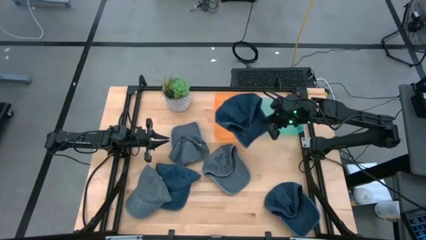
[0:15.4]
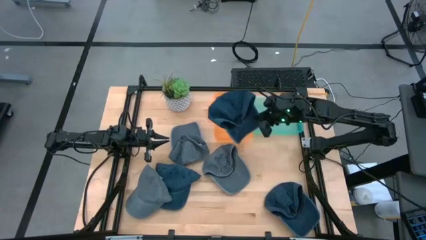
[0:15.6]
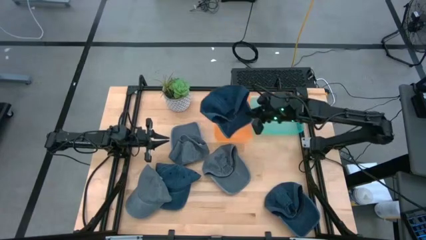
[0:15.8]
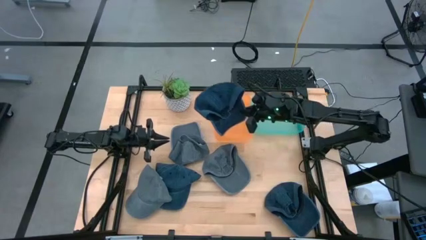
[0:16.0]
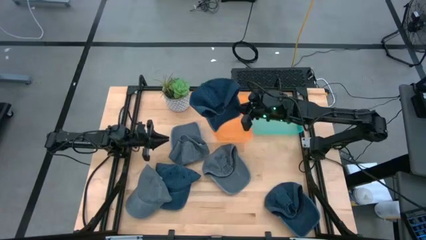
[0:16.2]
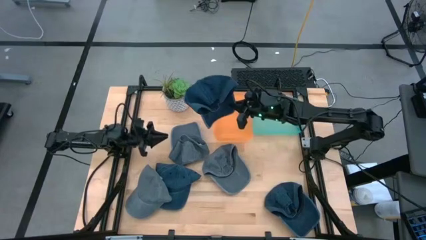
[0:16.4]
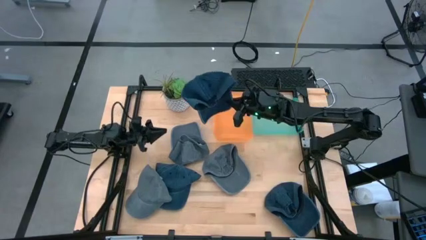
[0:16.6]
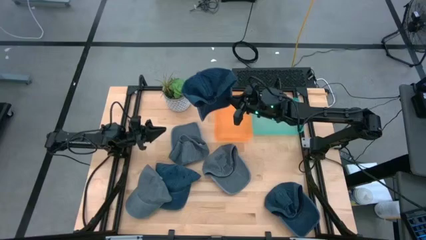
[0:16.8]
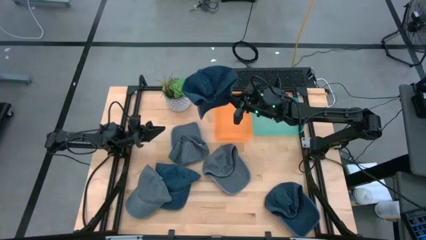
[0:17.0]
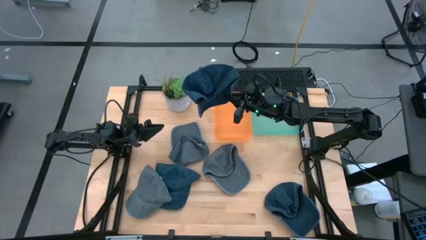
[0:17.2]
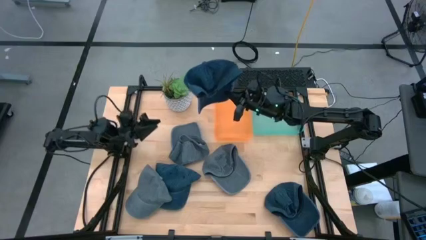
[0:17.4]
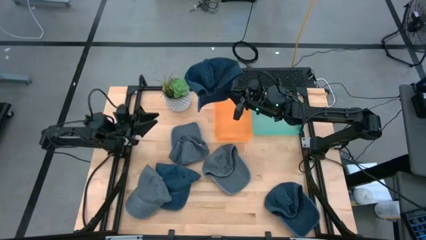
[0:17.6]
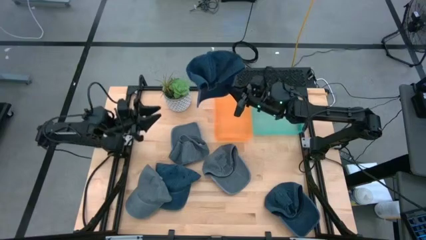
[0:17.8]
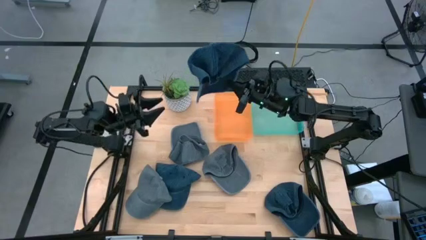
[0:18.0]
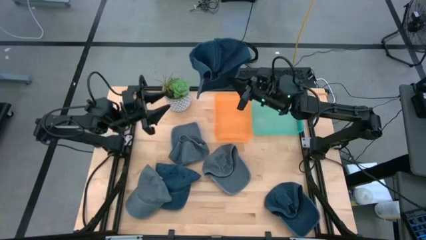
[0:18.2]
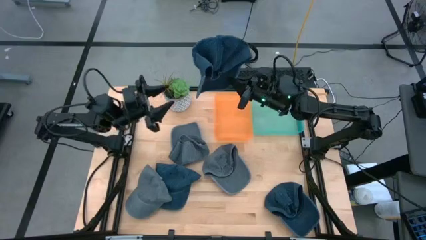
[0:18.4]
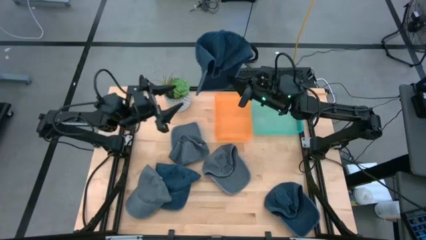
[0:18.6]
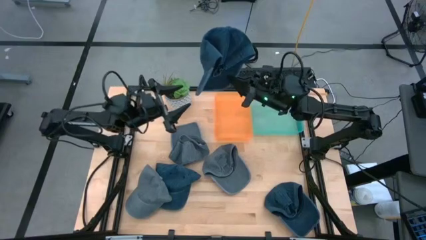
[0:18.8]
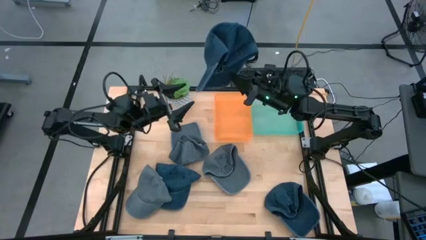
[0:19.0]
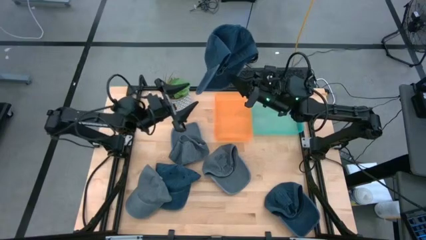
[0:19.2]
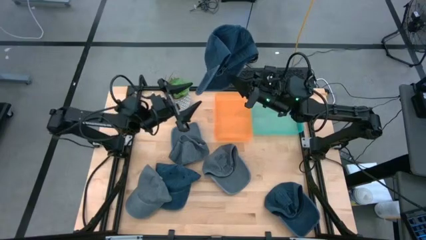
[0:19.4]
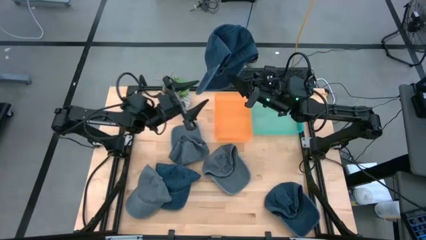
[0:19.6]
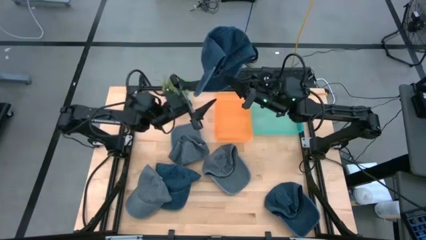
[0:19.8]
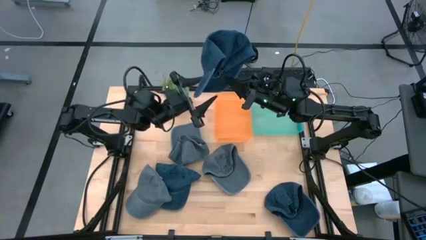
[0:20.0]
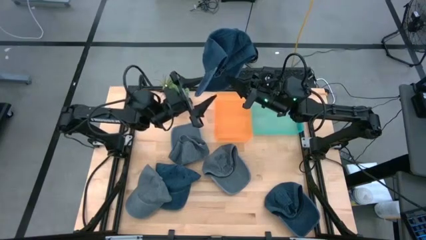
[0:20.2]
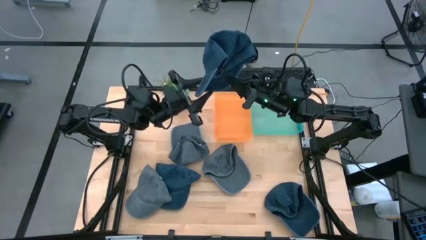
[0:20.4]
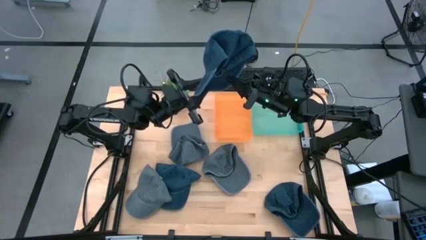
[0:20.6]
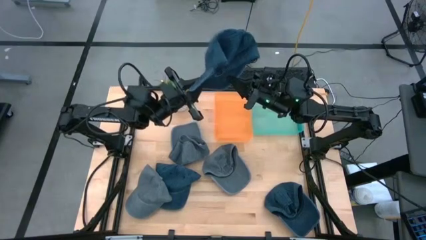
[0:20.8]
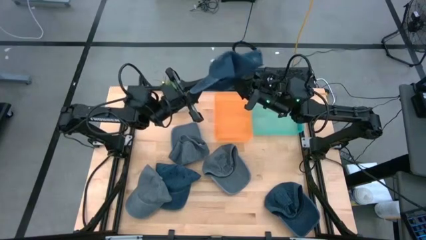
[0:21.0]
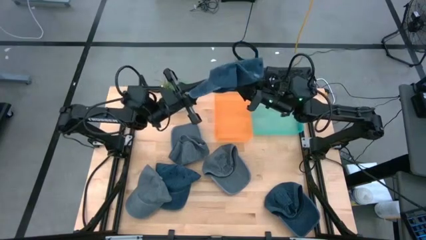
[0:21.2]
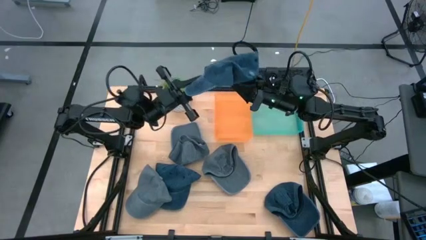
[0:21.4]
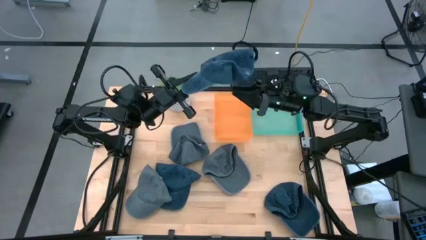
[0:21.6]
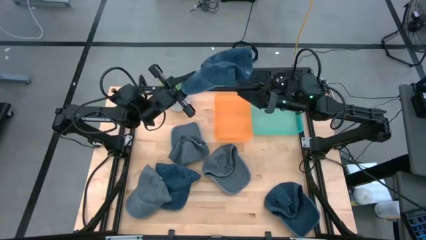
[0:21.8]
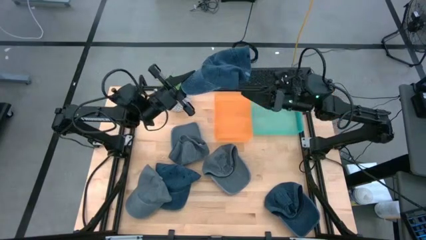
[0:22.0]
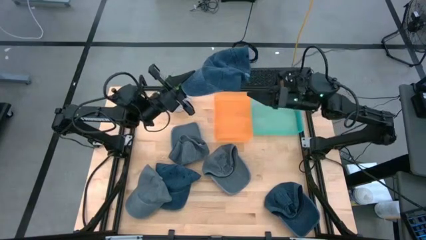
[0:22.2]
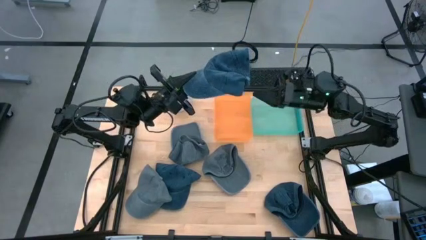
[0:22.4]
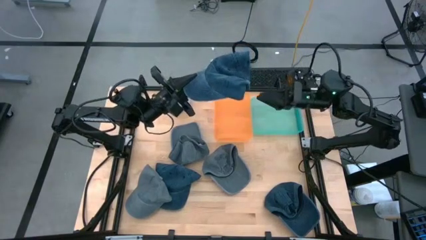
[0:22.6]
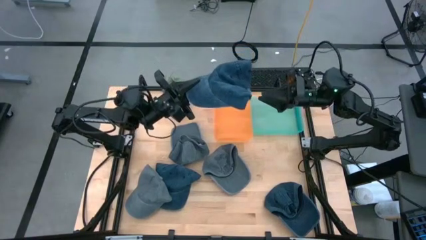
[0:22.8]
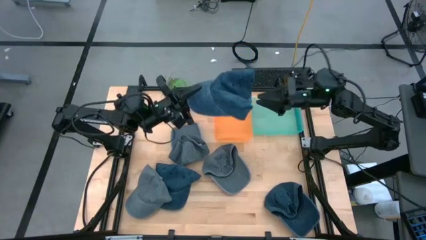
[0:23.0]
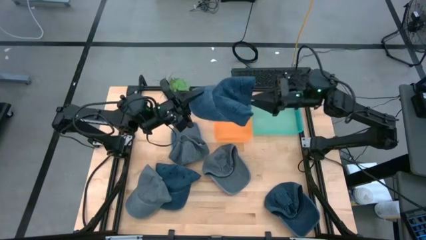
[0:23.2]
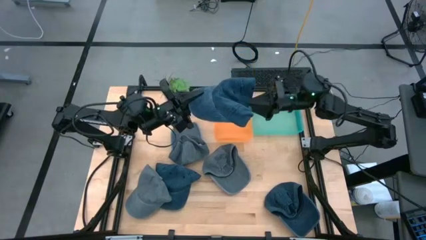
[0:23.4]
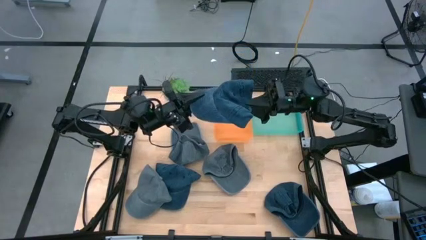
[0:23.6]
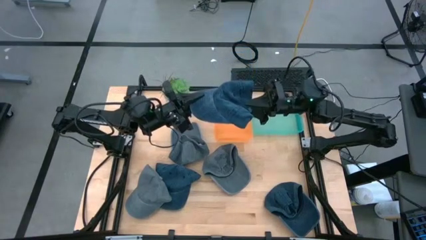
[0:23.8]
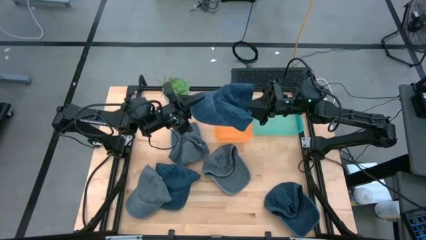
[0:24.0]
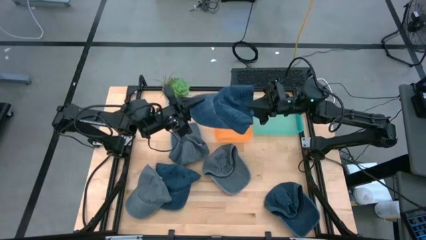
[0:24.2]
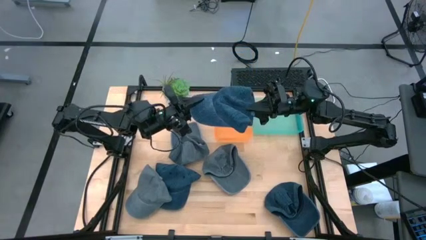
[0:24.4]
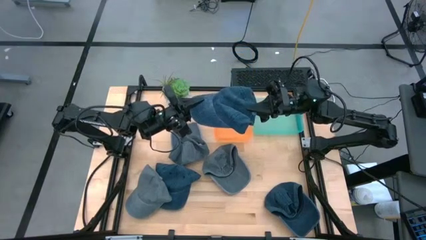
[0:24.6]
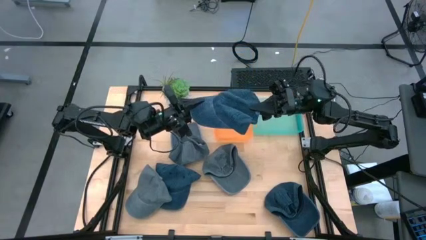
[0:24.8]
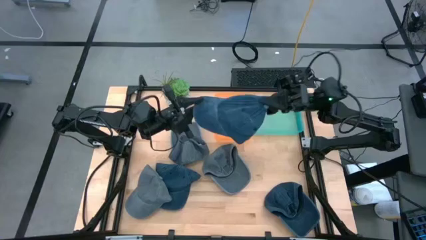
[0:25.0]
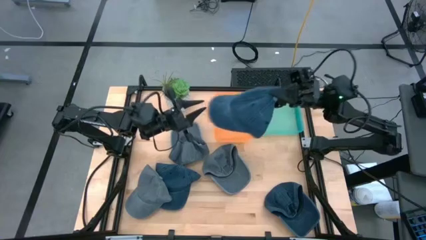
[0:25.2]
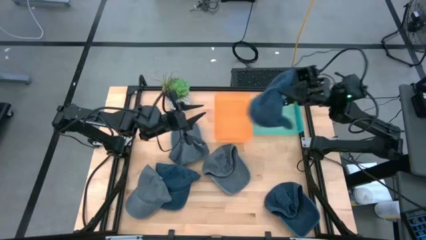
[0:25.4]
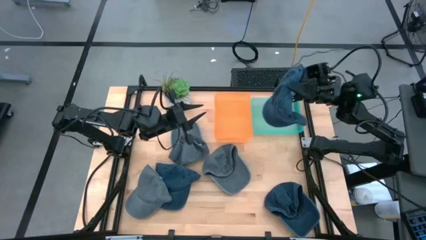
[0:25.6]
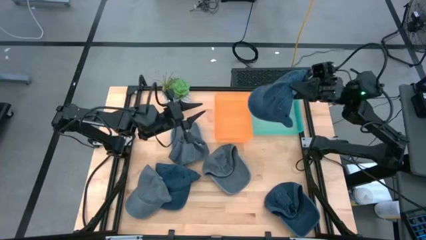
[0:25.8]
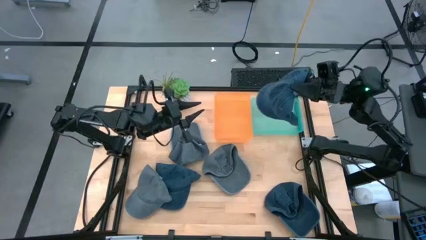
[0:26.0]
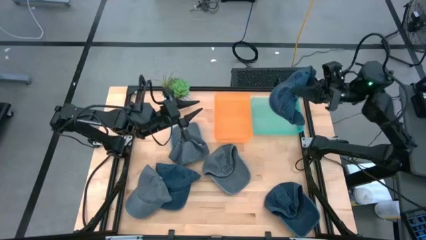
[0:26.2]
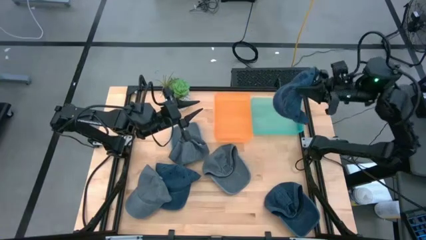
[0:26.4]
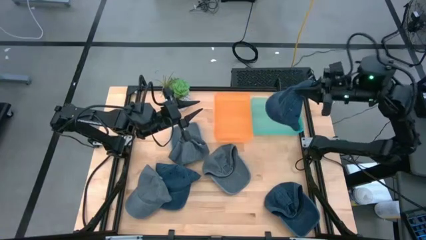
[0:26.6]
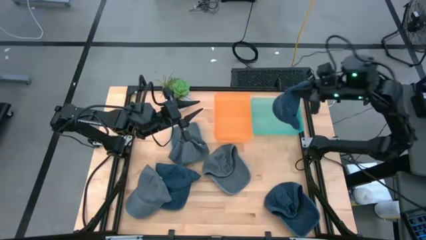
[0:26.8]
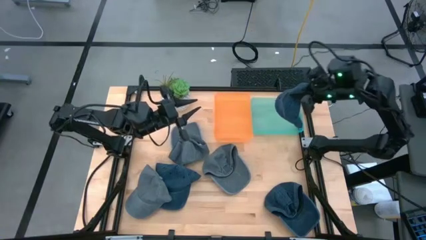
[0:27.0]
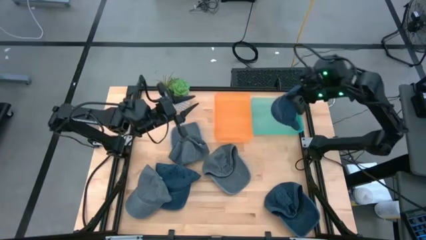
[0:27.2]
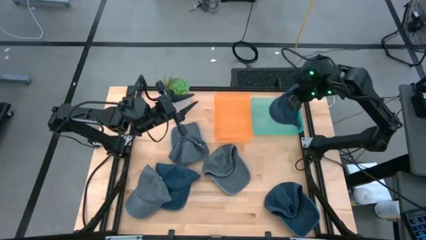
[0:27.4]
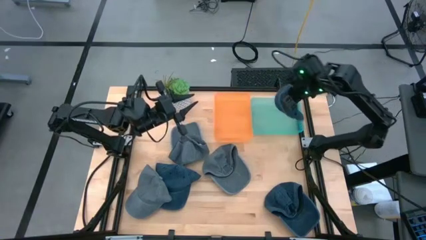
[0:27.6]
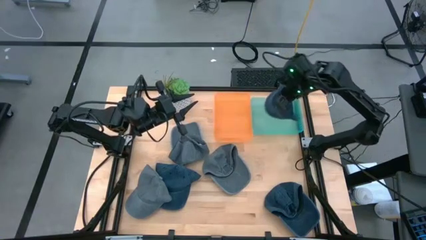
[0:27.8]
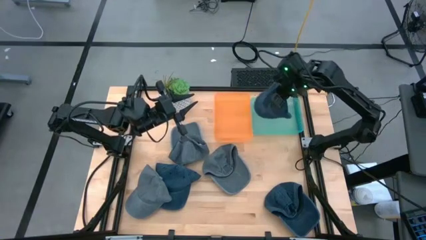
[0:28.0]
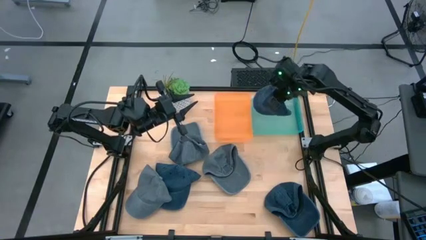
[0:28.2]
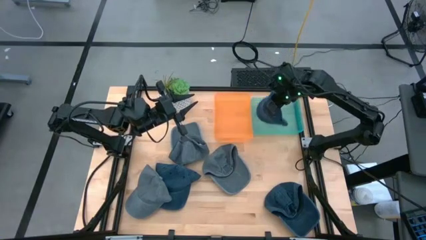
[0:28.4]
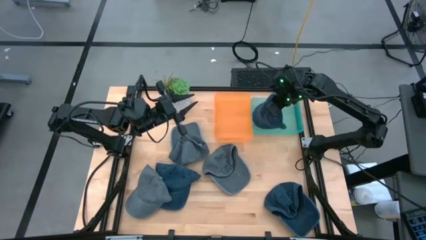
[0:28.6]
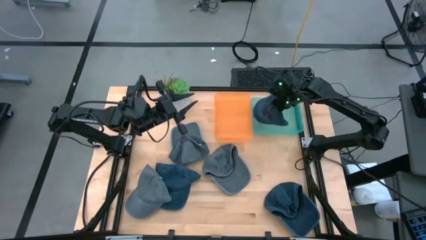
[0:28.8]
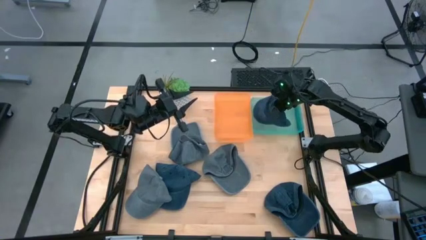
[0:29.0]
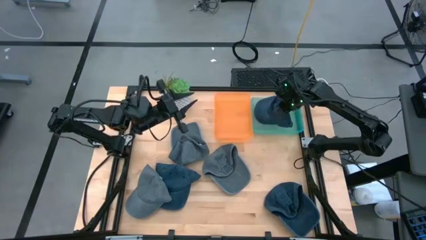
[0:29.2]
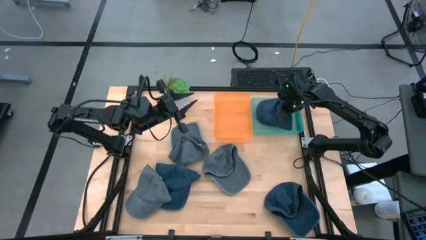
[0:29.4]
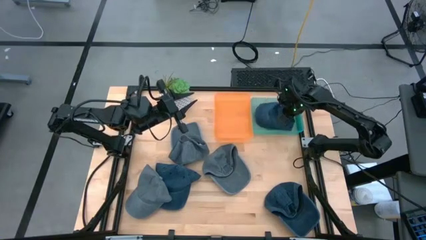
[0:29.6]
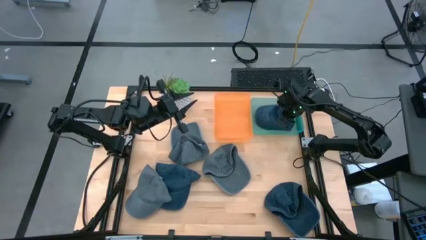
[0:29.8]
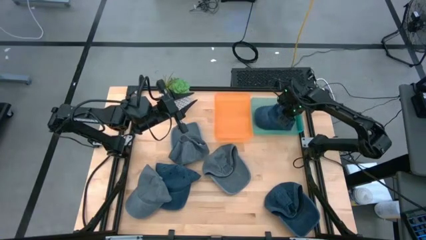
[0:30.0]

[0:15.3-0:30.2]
Task: Pick & Place hat
Put the top right blue cap in the blue bin
